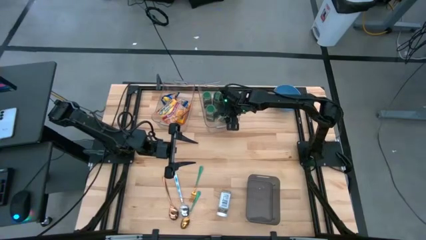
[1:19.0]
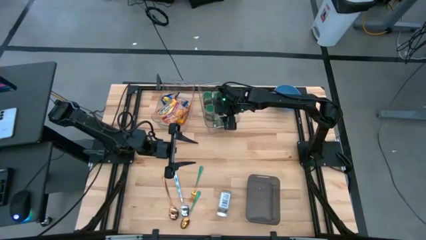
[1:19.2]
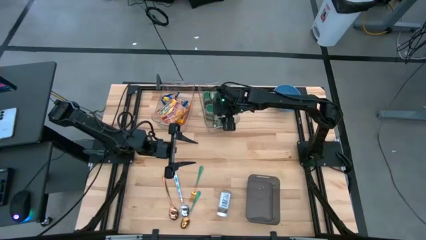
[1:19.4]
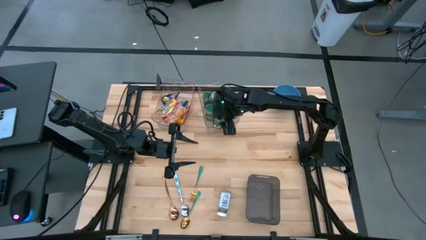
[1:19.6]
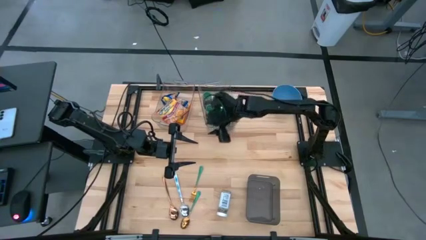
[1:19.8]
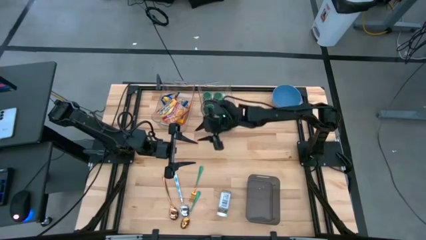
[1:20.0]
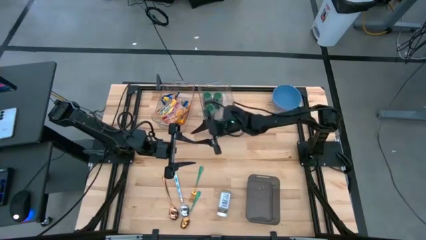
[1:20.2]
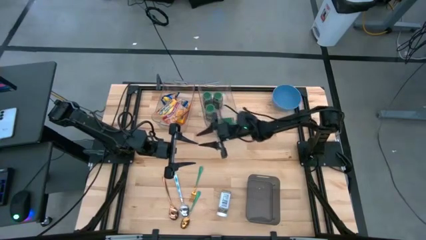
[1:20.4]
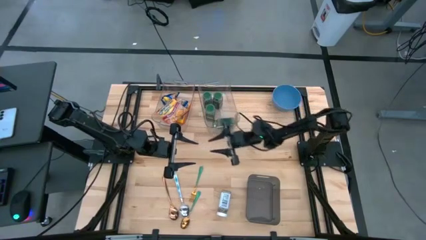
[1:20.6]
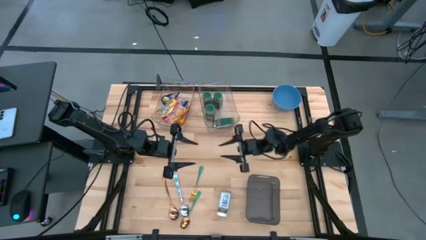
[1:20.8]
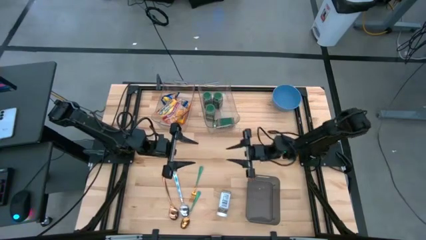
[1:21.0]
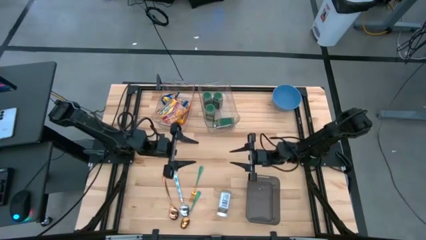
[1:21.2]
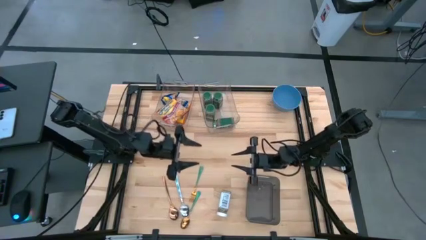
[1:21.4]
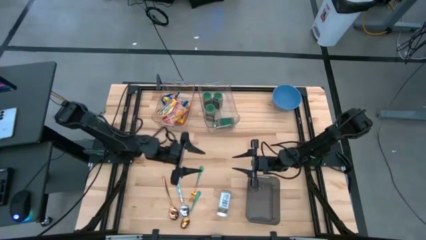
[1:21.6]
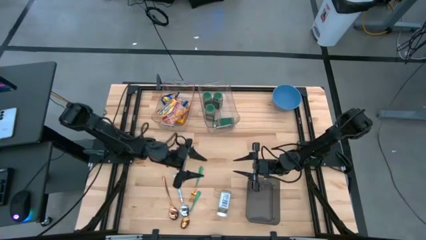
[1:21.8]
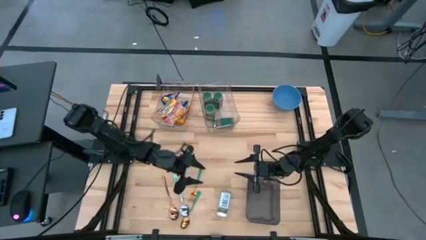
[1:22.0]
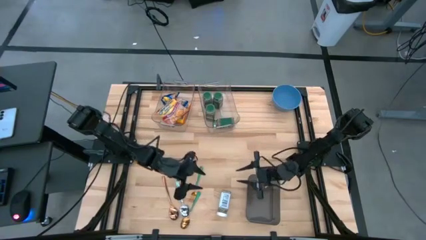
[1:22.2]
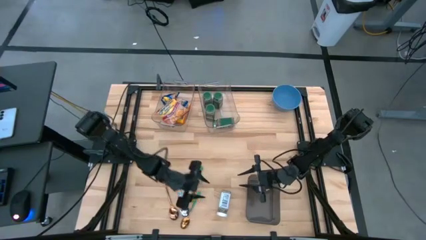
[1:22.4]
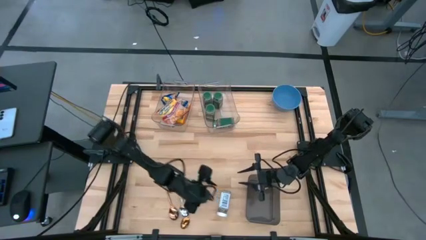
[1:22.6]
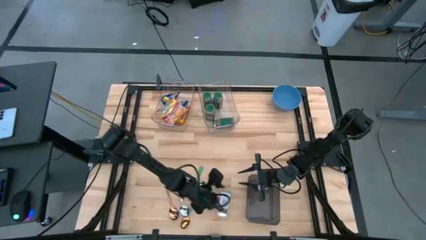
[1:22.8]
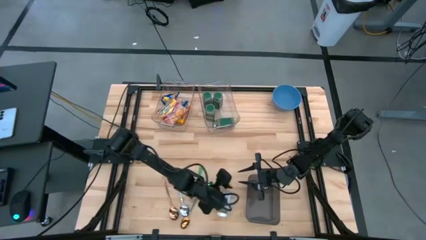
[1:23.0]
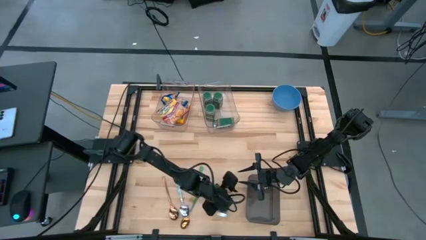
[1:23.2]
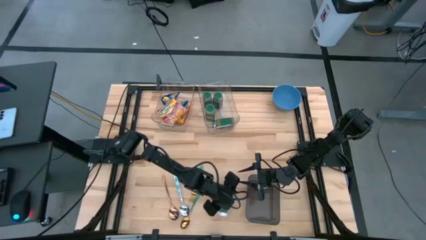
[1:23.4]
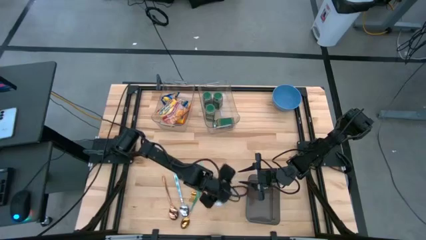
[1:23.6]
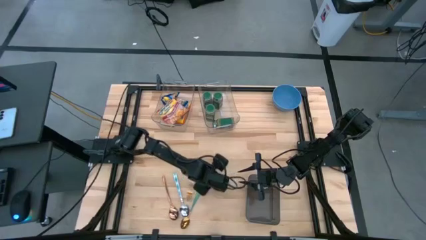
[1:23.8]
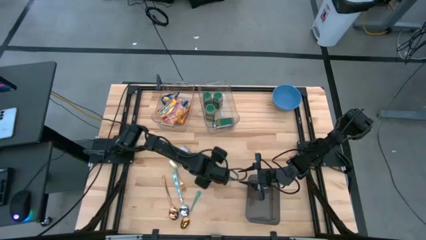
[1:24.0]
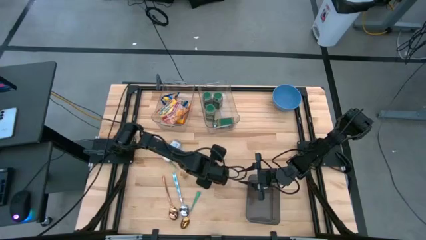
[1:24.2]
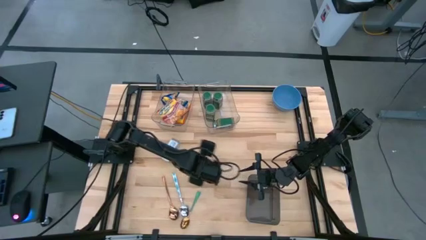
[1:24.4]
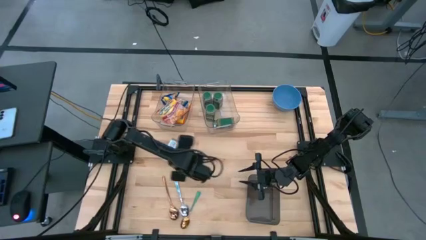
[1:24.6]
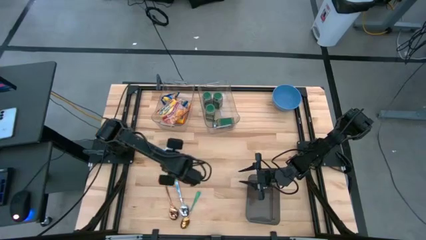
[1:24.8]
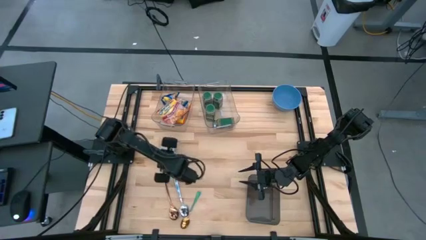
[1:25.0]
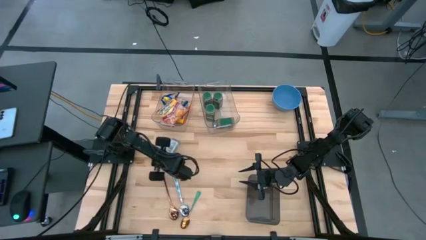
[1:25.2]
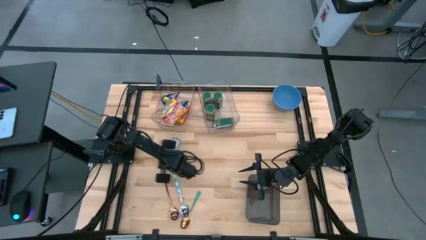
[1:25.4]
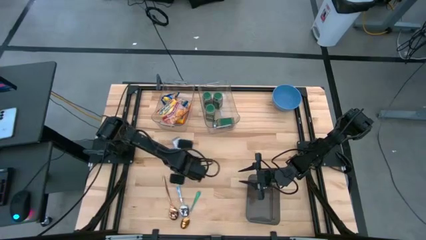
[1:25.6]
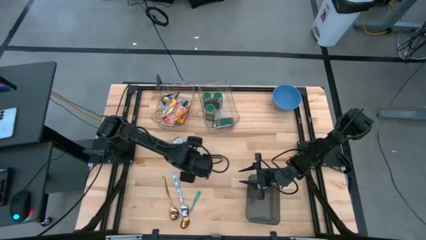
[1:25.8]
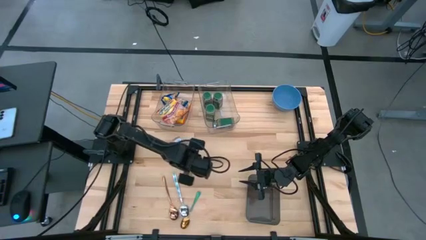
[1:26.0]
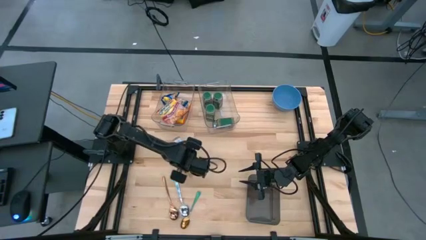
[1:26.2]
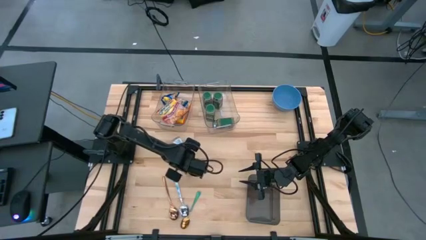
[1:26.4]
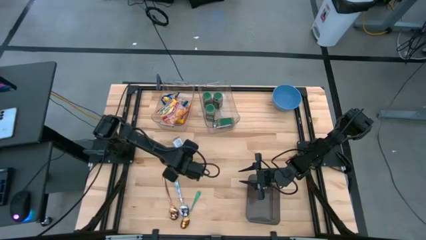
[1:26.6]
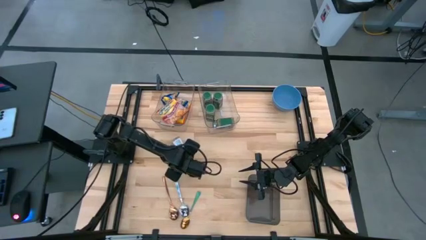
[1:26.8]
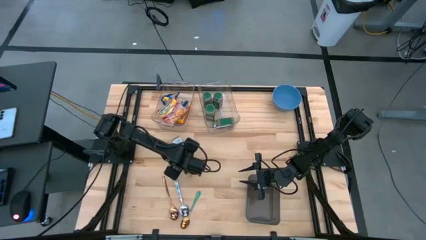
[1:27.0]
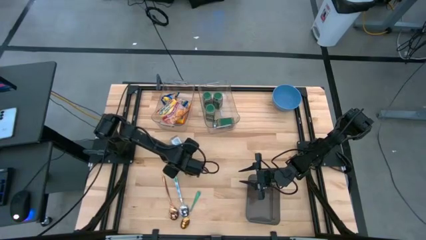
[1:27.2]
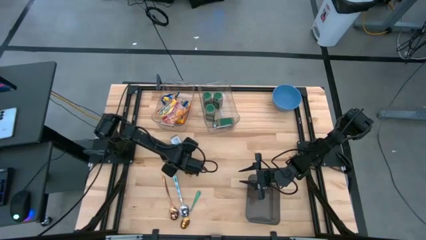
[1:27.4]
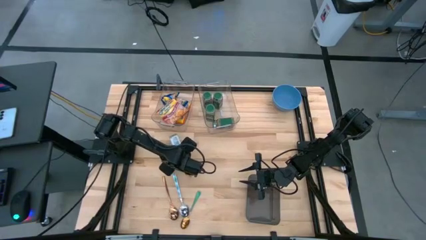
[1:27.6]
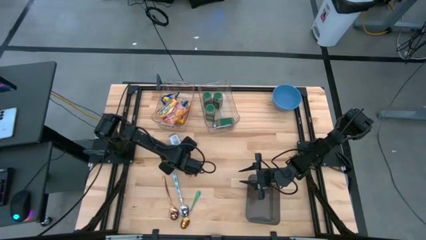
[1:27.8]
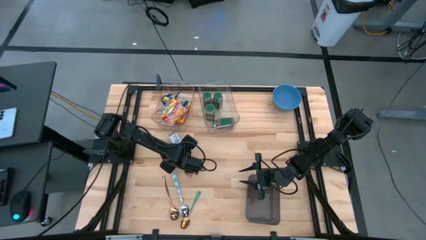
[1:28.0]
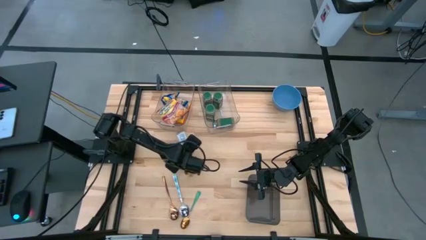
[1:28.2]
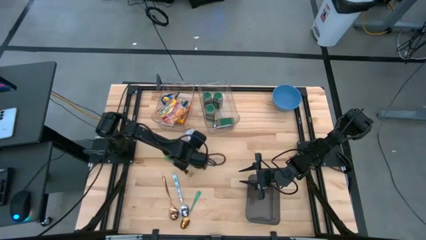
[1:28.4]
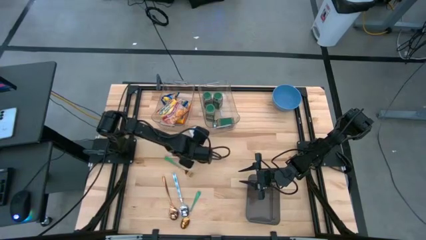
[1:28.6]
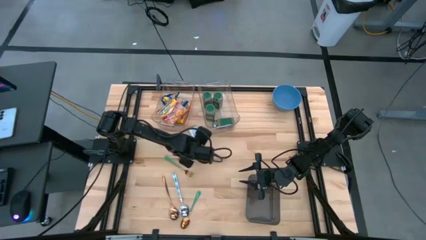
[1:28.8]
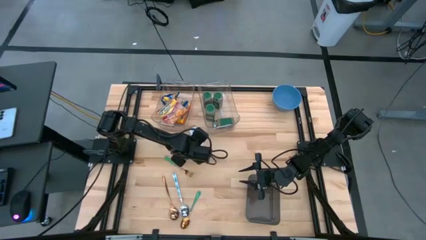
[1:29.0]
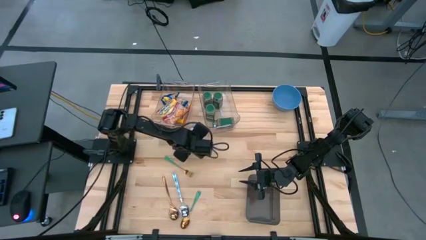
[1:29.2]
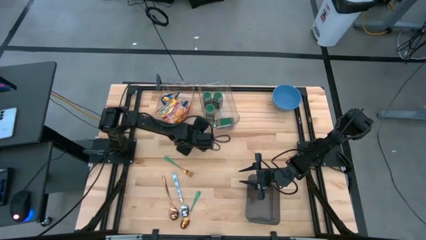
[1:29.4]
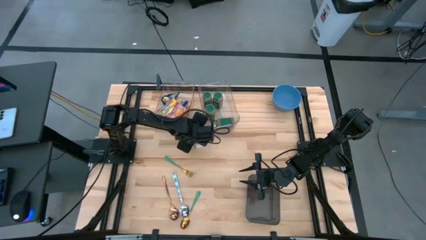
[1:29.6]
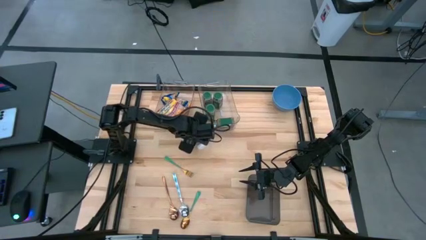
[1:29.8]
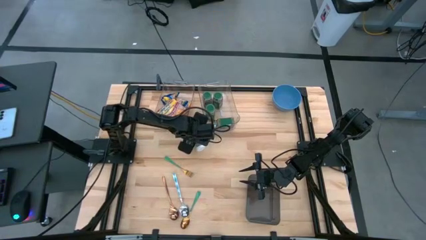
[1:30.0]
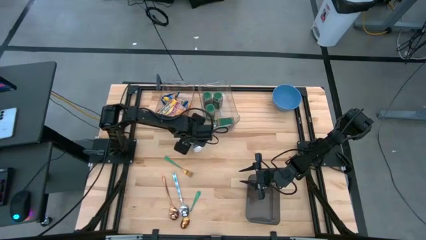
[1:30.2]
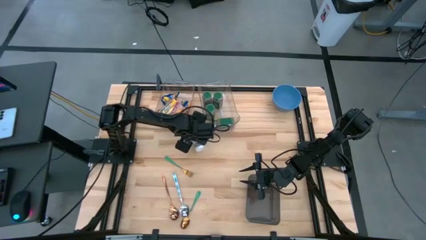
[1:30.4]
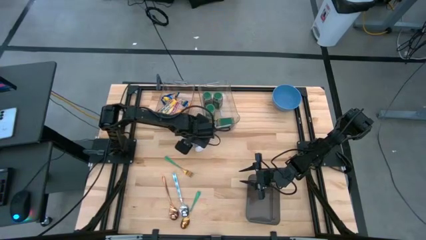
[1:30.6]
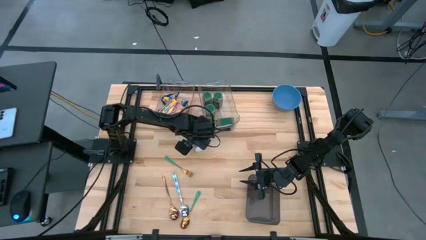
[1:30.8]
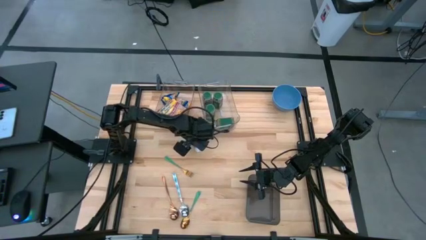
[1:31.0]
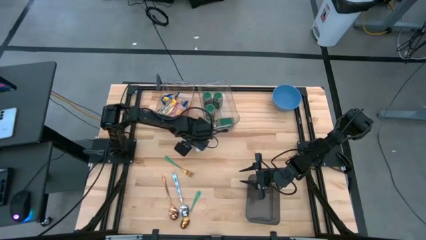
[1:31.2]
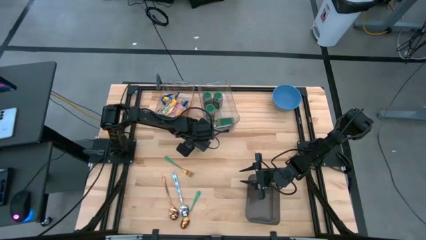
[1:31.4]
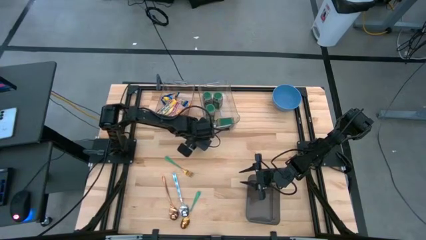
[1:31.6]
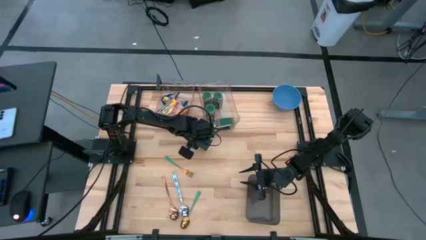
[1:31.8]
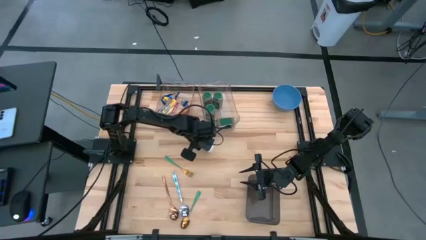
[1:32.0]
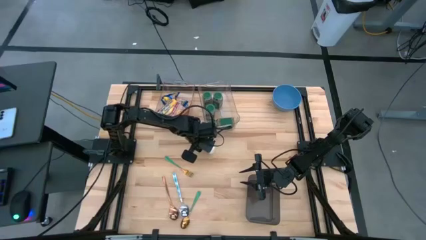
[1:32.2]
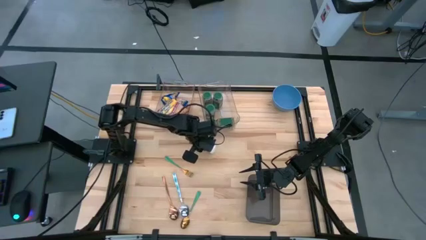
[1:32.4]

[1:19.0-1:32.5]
Put the white spice bottle into the right transparent bin
